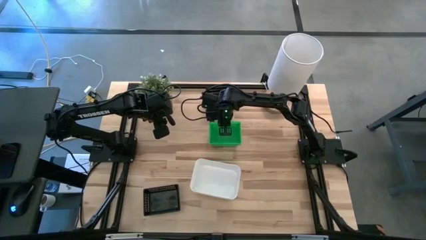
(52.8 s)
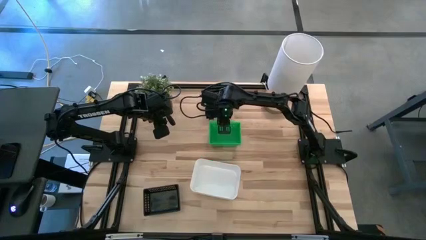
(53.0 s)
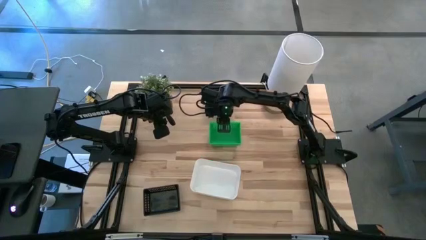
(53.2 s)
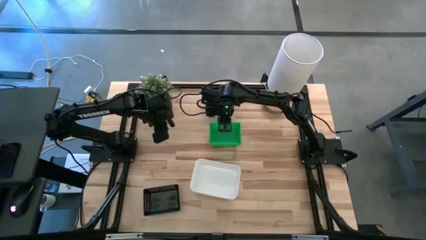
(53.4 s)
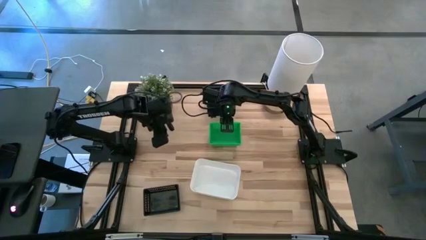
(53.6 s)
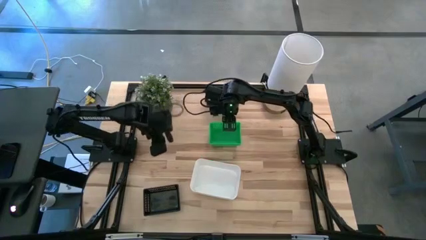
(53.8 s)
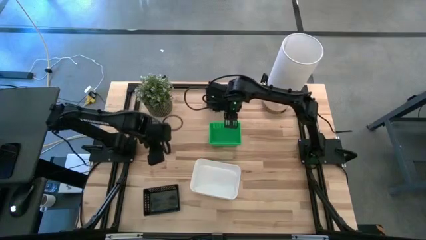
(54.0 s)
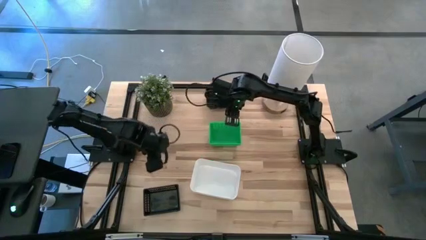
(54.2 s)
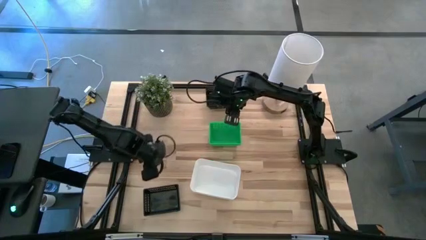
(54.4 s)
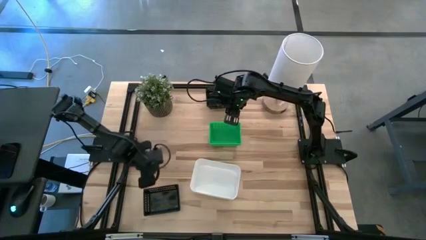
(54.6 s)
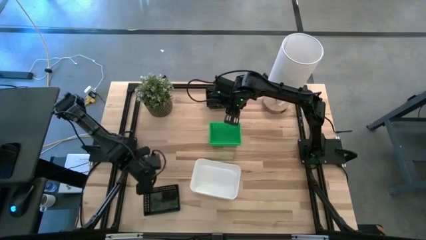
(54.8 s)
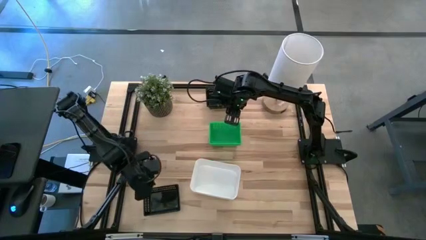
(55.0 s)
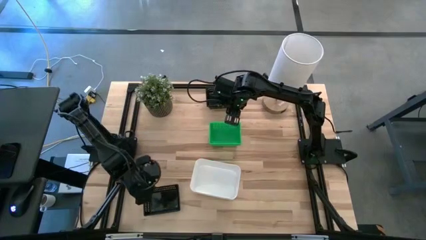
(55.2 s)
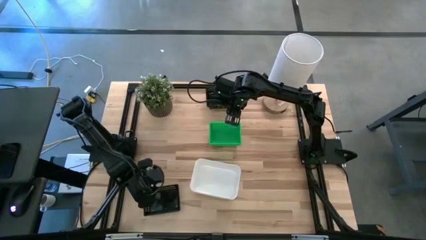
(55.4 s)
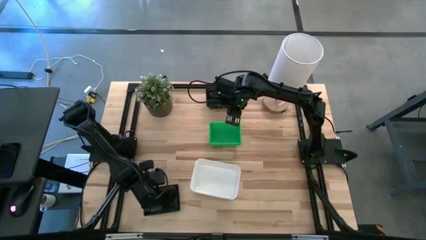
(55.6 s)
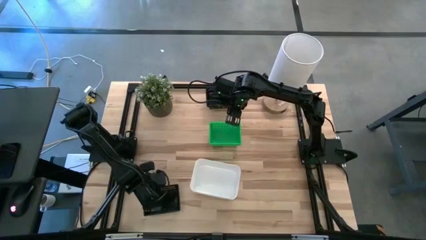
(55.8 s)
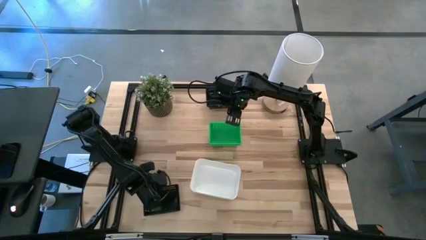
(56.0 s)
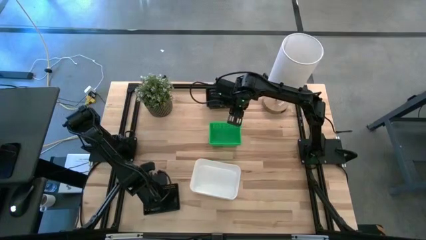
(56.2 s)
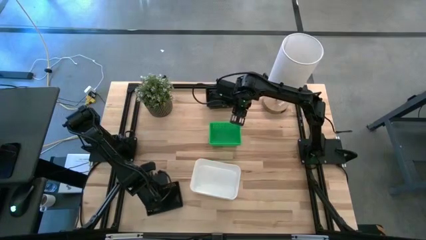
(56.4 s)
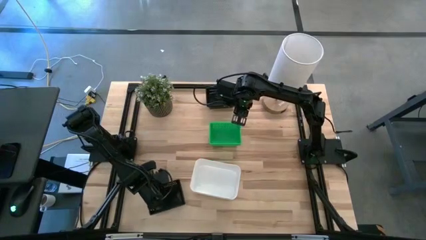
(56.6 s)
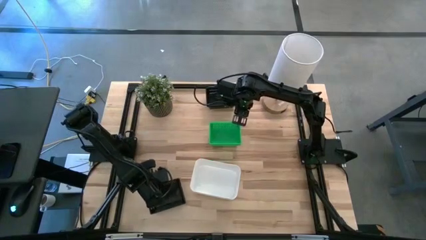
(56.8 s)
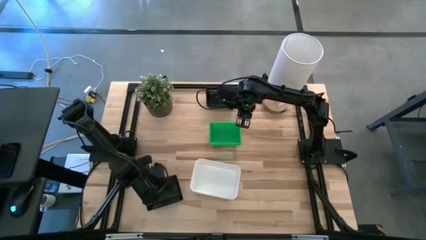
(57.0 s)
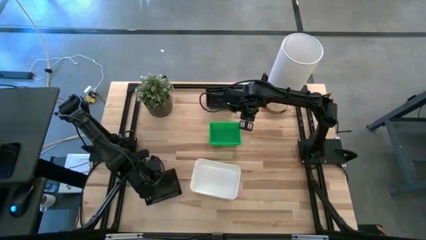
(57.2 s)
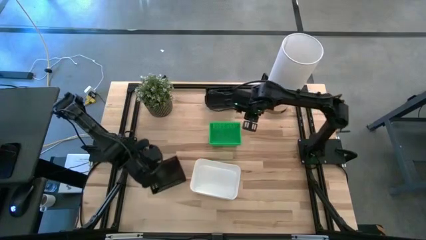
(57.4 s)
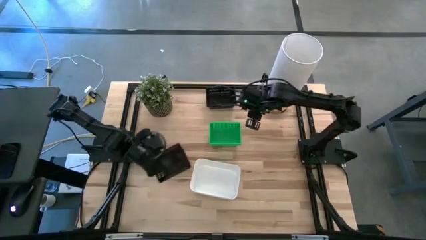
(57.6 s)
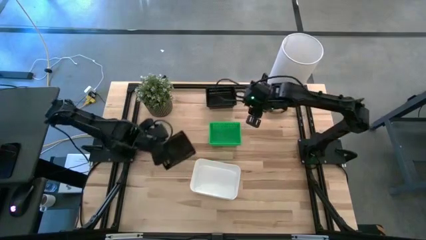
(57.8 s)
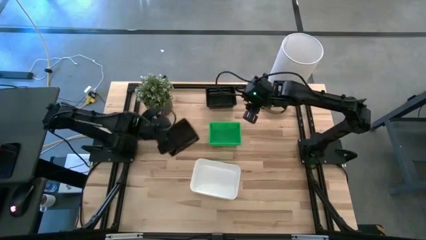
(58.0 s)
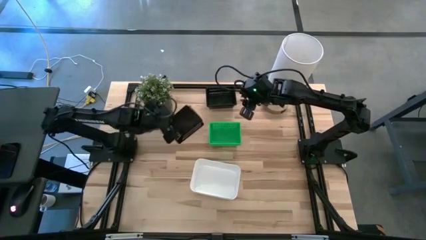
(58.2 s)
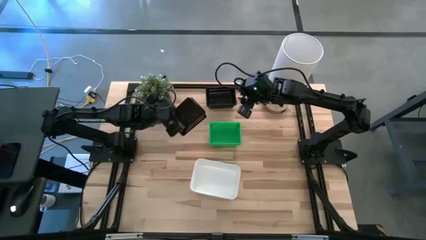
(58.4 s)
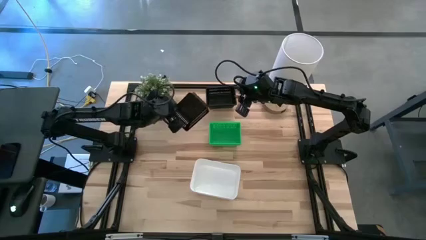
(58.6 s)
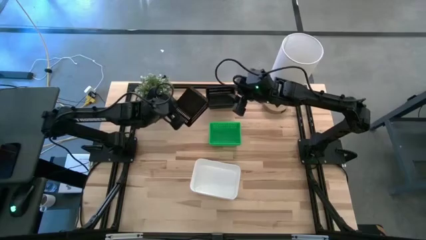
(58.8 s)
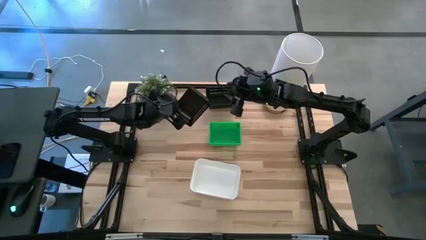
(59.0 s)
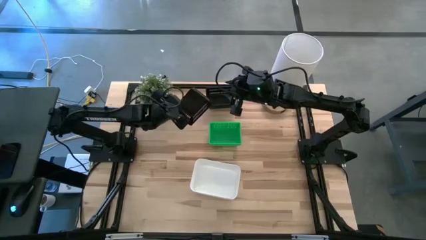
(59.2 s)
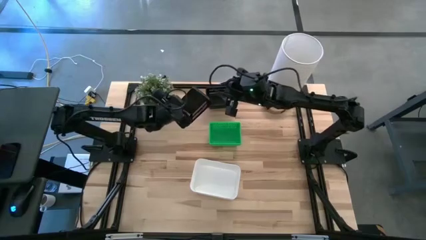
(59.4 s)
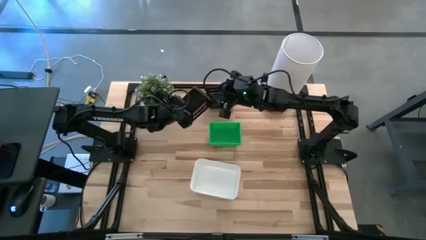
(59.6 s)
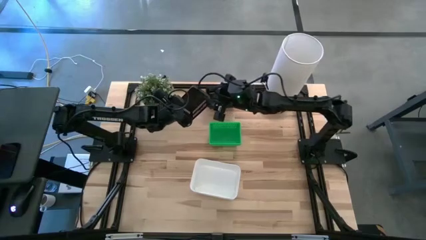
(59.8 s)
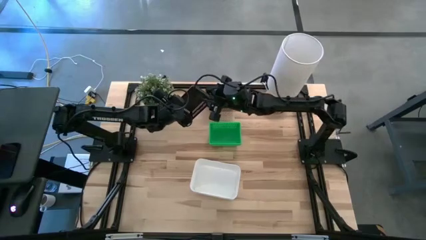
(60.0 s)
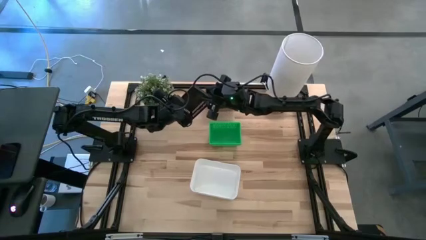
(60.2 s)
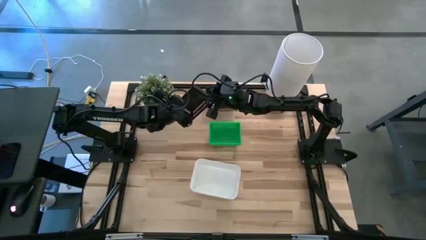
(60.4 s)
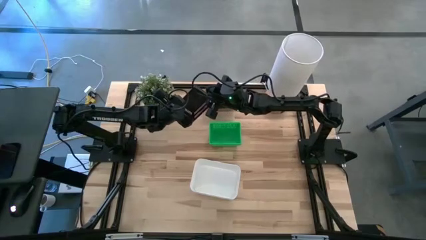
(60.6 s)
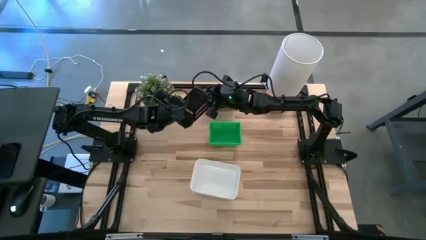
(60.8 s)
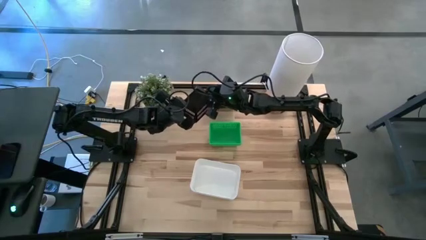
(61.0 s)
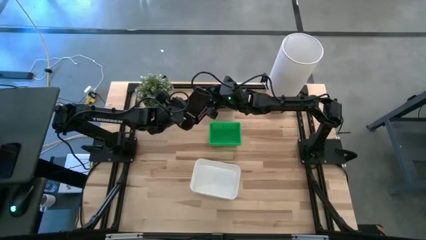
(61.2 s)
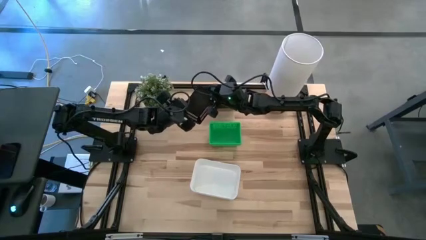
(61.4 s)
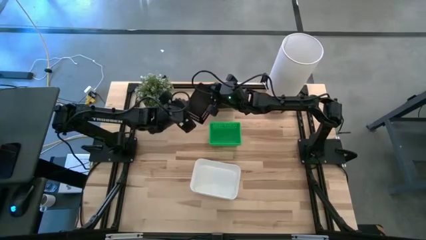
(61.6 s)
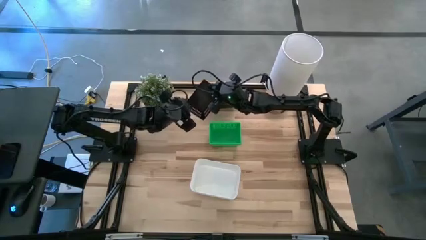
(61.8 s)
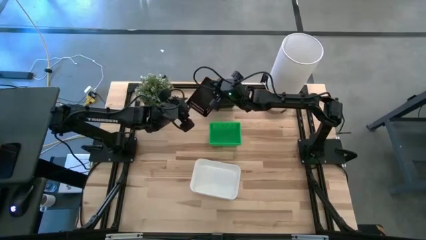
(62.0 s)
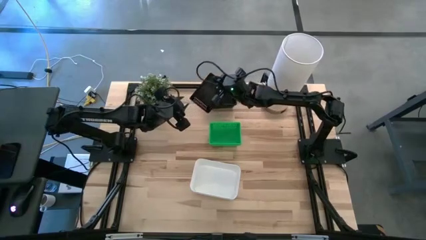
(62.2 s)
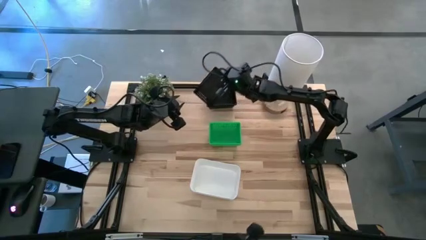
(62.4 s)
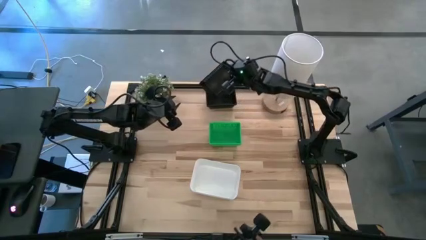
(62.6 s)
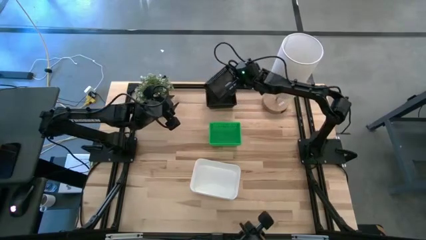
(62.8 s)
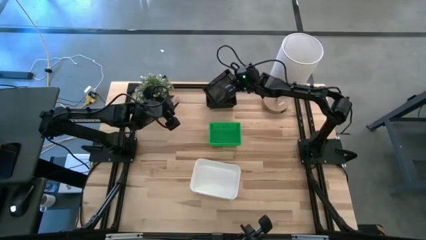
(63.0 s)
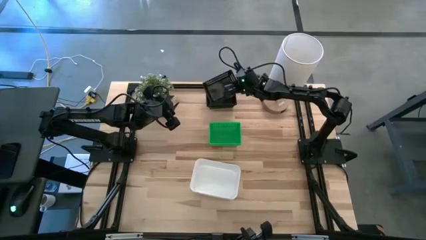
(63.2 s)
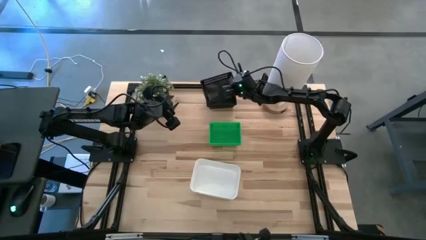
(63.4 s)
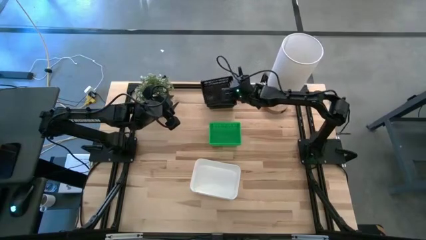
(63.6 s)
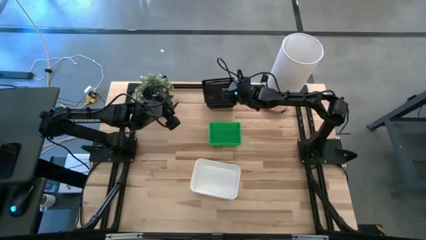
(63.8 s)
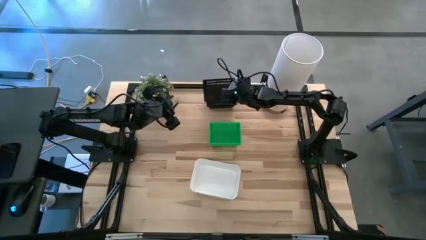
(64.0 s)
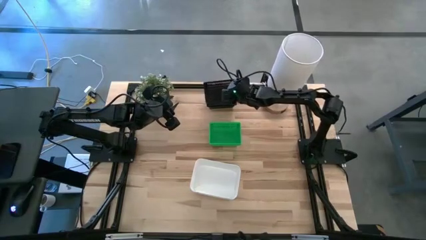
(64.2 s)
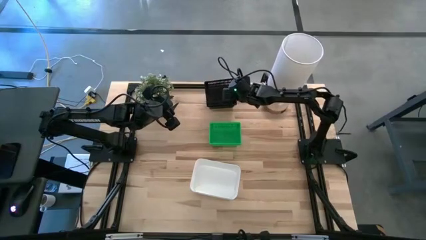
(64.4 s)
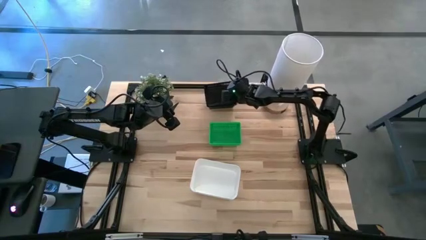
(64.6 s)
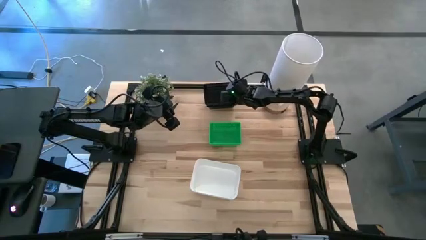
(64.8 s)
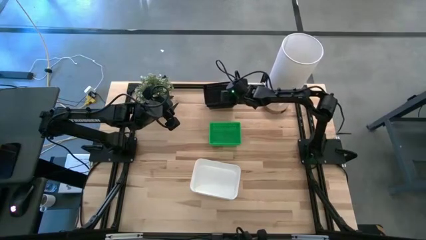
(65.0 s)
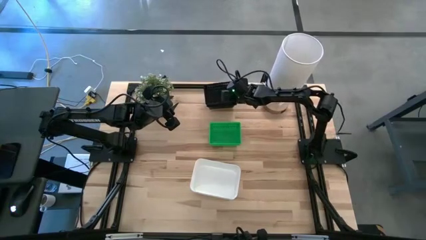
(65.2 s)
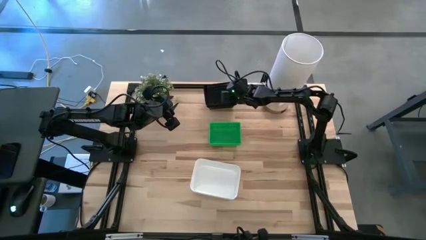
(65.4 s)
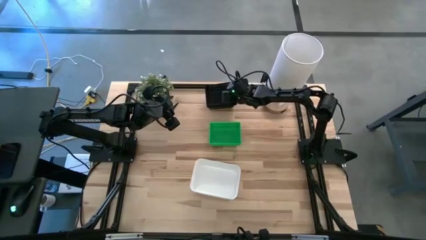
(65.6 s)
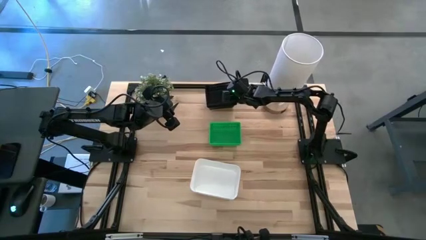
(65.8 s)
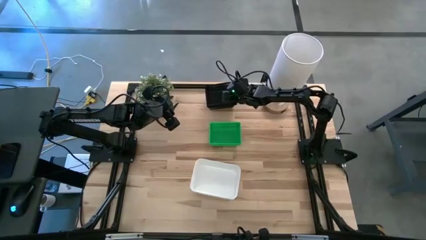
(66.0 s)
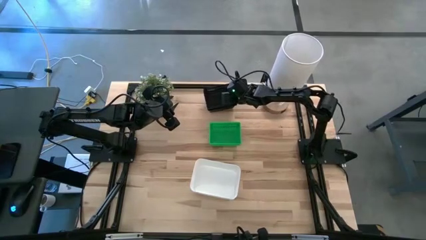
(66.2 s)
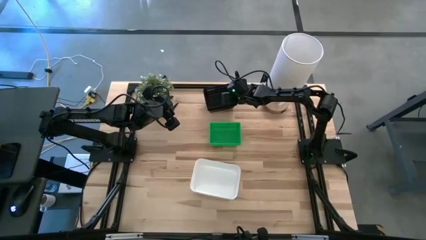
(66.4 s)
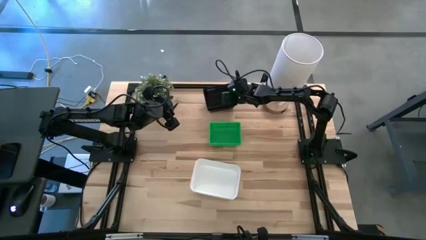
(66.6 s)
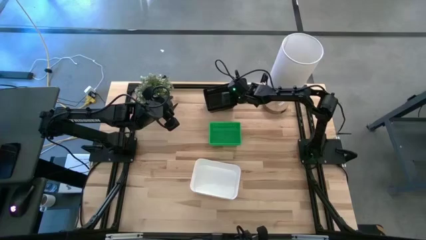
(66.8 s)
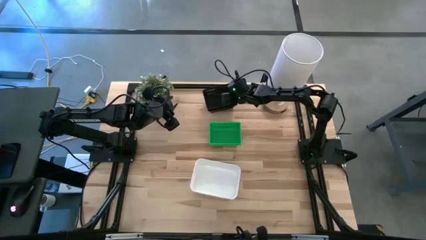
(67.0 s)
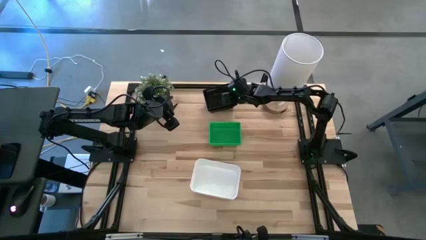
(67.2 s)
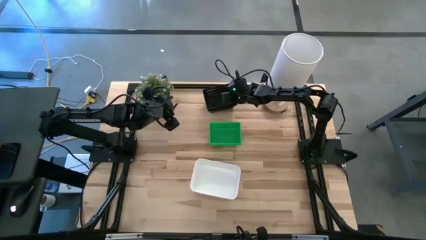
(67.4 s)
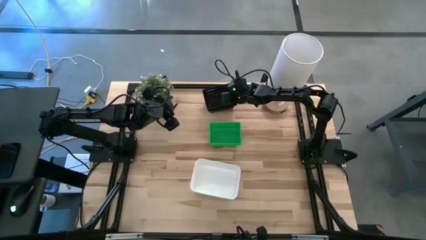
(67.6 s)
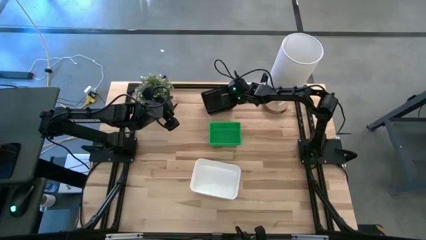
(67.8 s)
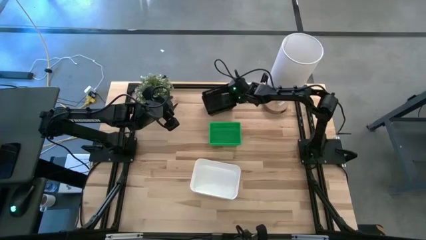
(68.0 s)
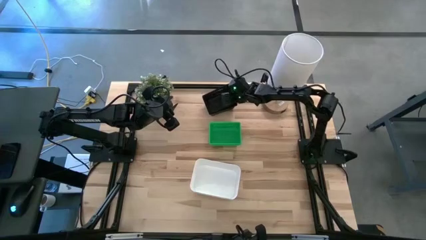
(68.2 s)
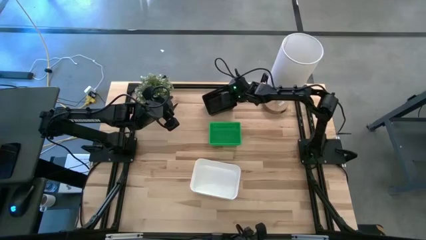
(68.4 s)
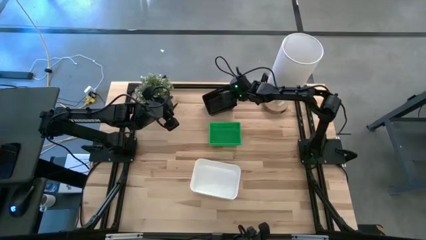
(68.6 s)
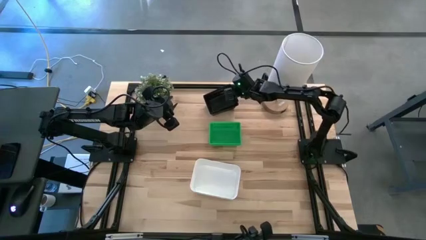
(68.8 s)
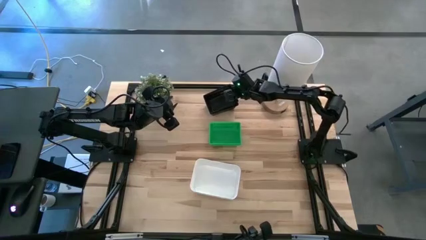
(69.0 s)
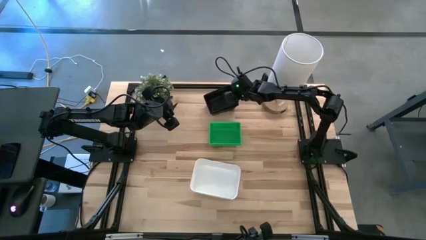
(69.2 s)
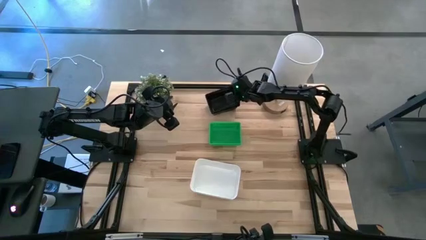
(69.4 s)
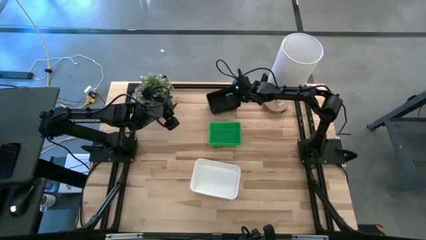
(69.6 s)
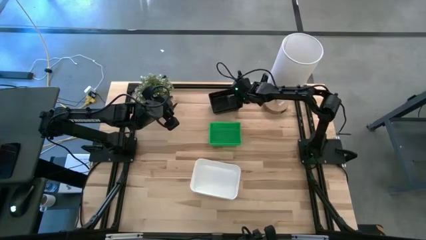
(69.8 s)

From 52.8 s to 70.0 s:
Stack the bottom black bin on the top black bins
